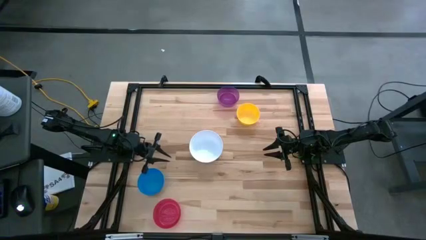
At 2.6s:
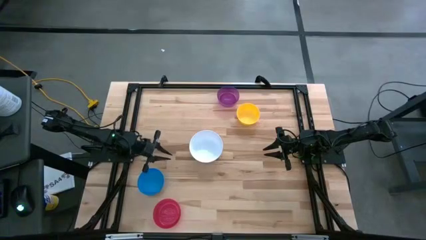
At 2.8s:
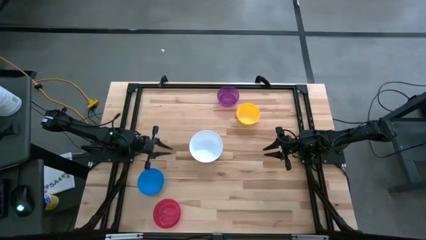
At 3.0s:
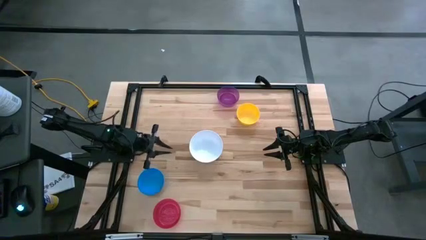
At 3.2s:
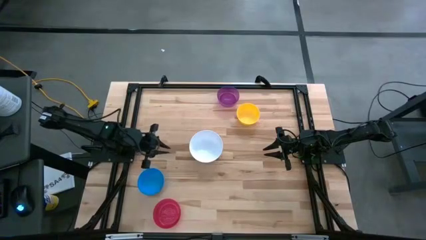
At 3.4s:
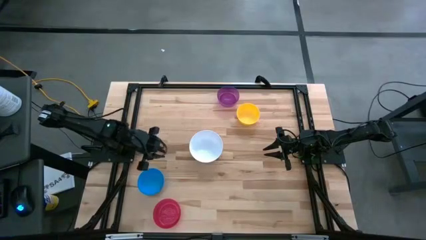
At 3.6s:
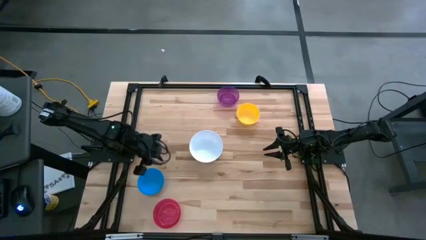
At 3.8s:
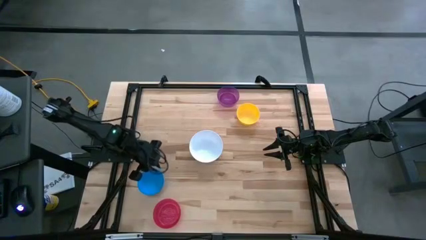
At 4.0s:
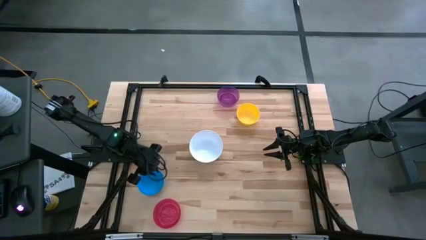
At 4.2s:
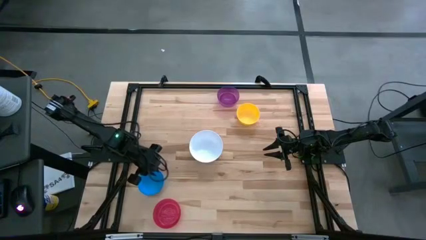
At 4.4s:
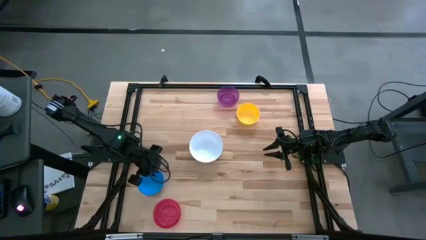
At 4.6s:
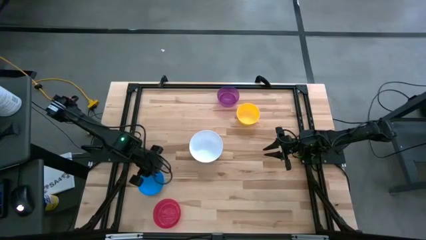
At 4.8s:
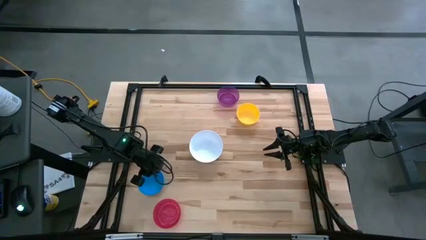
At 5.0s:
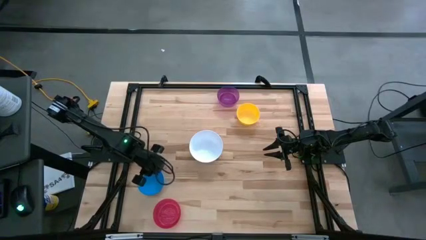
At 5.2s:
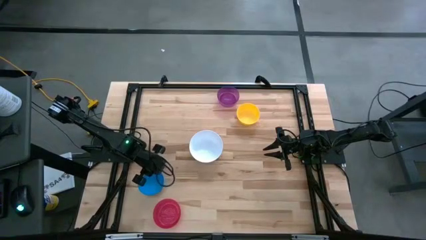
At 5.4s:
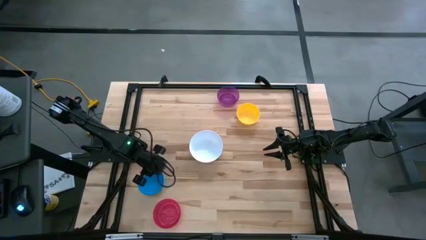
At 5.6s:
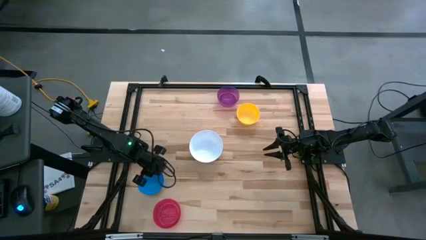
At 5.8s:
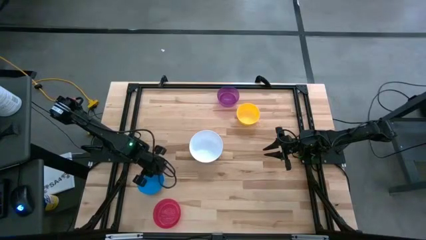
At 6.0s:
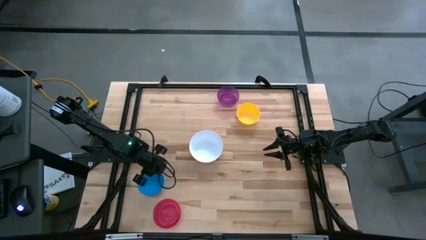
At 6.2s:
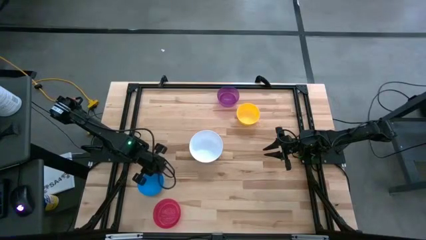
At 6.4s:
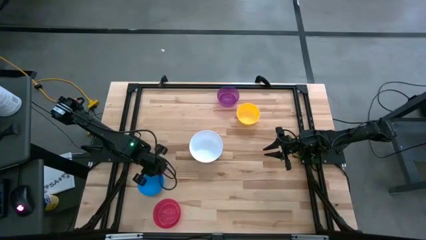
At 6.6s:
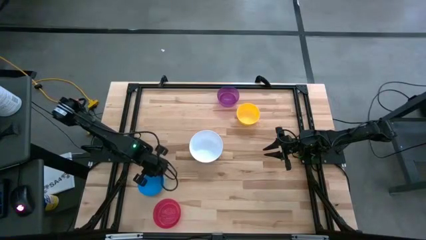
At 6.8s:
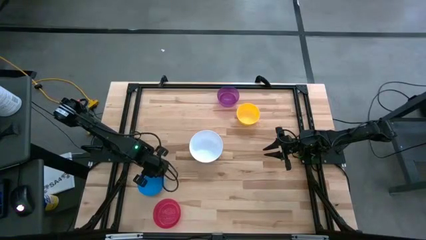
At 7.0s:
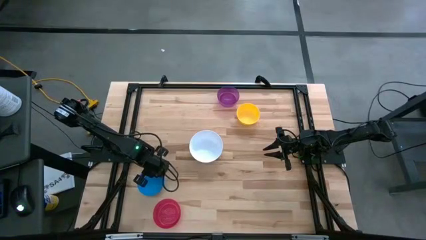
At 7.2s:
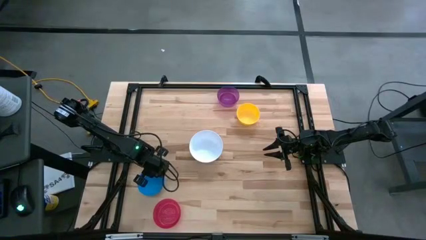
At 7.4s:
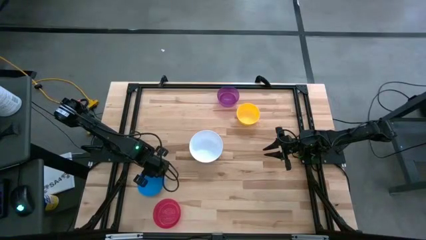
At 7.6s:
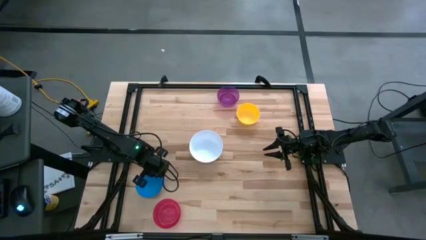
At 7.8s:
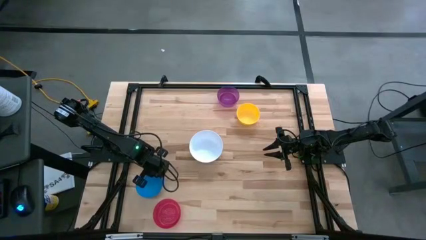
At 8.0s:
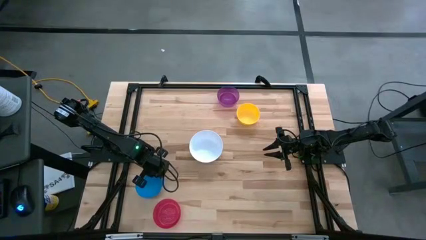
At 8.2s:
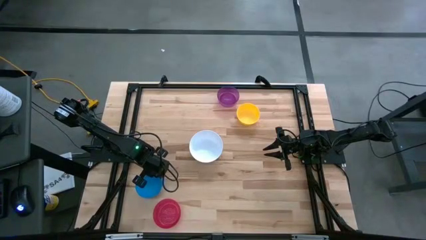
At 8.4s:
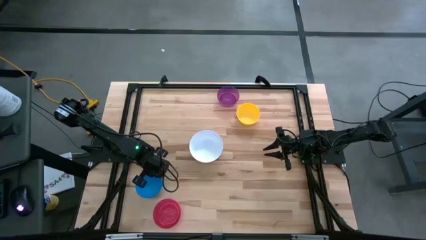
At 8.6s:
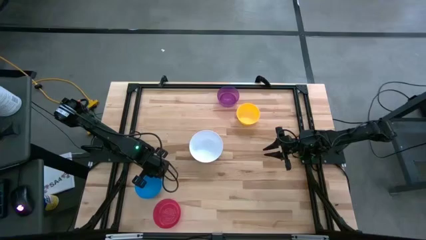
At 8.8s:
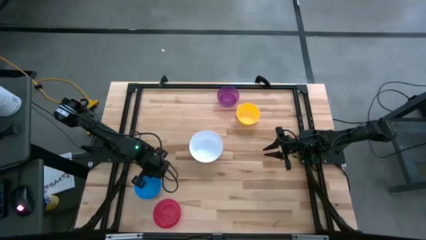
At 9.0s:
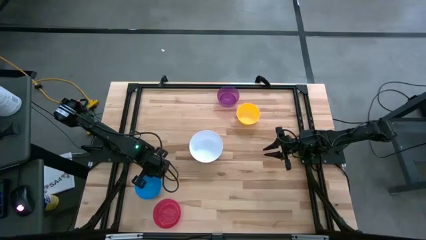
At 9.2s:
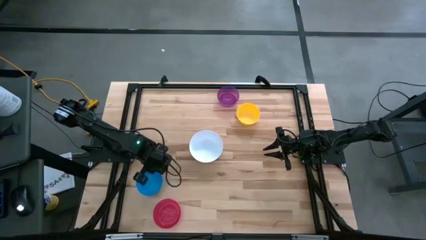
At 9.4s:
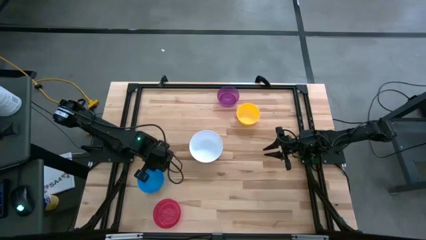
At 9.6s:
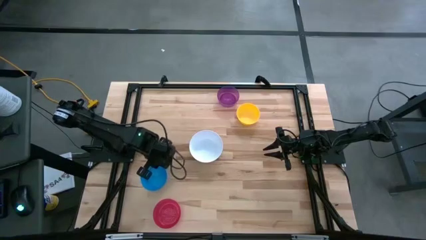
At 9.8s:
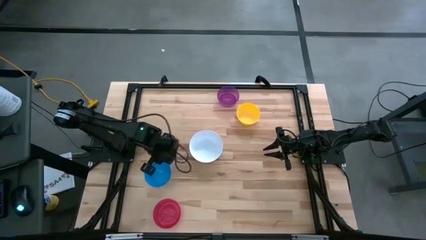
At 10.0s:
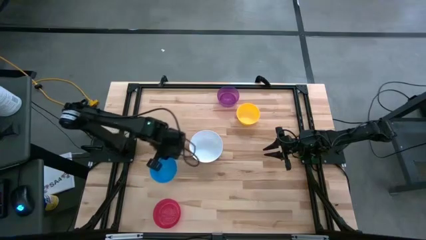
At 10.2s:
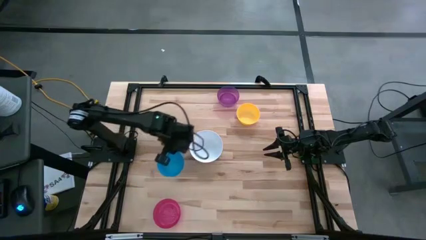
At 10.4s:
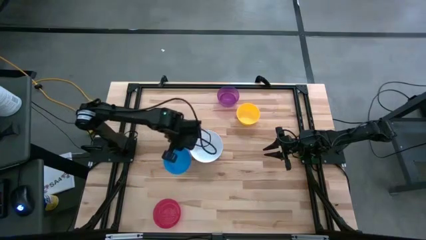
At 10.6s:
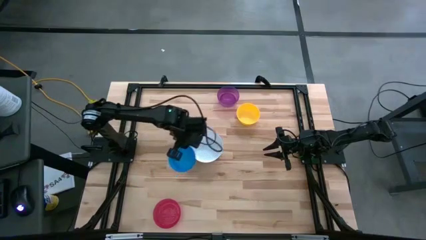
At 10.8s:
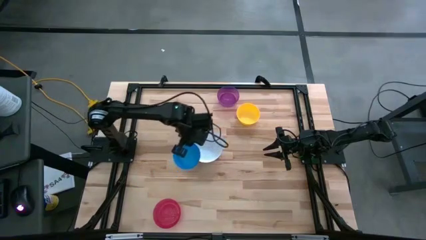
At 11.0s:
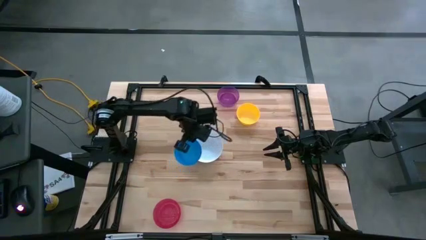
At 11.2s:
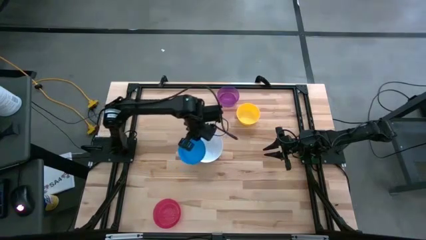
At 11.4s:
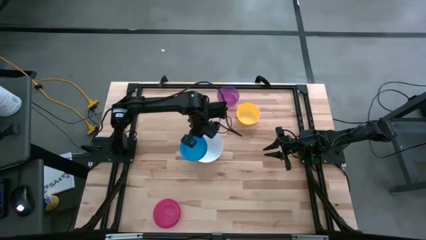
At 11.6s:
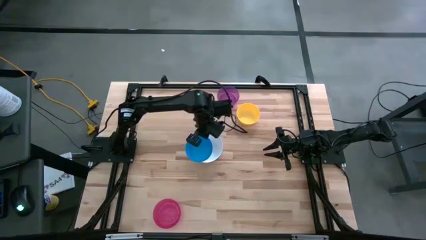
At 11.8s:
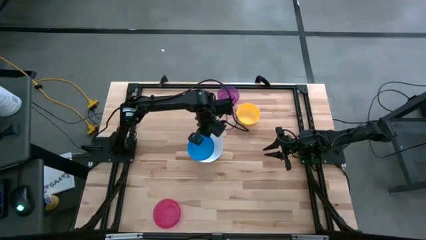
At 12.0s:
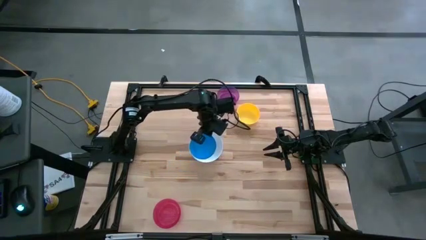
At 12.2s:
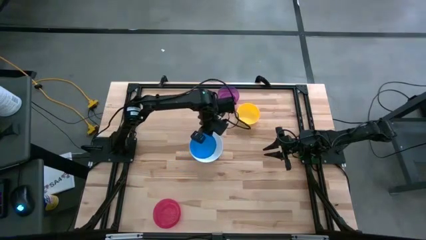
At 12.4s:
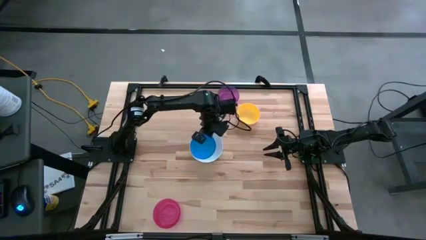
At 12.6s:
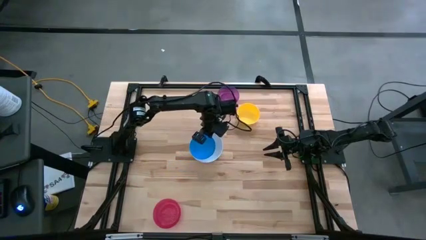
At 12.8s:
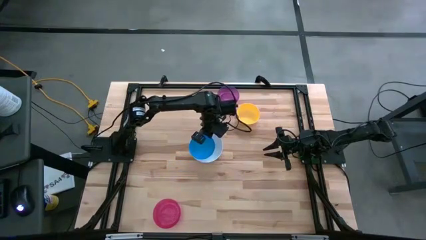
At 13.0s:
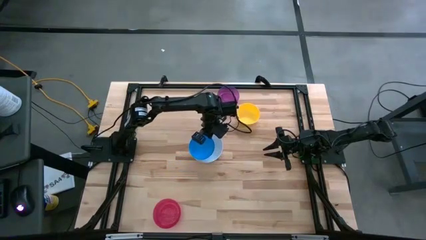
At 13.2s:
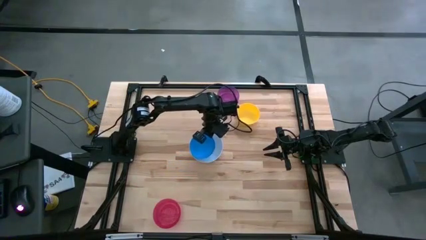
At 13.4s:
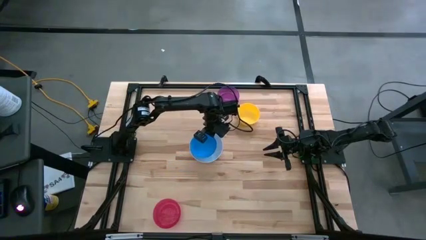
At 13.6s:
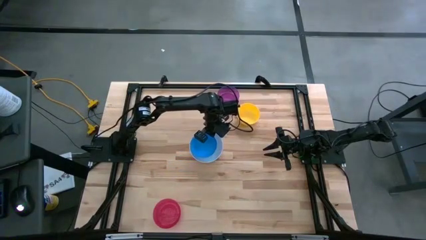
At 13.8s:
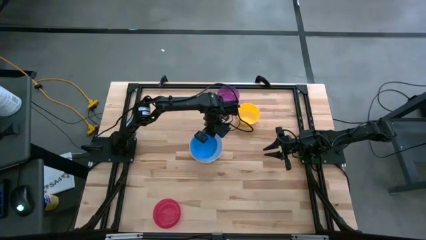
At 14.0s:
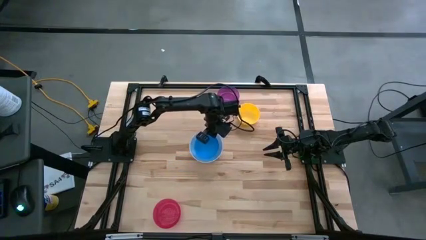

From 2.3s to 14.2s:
Stack the blue bowl on the white bowl

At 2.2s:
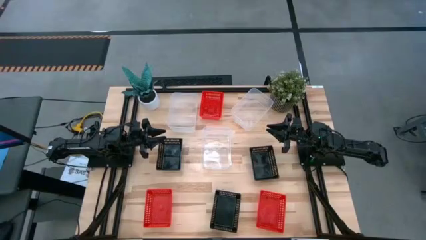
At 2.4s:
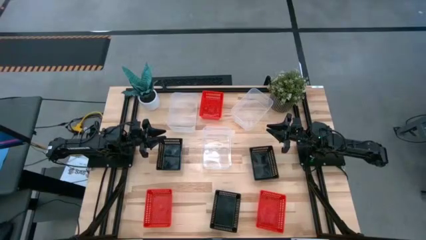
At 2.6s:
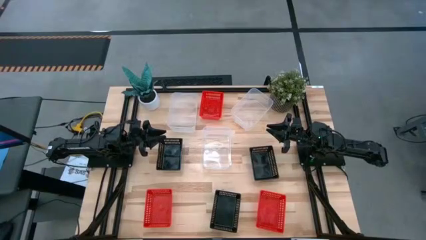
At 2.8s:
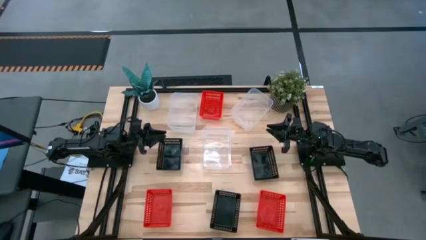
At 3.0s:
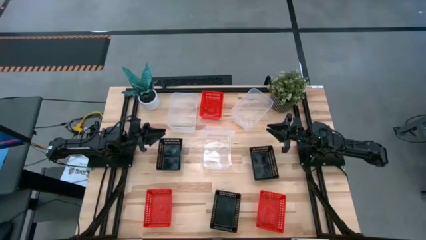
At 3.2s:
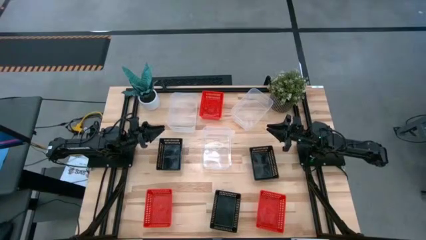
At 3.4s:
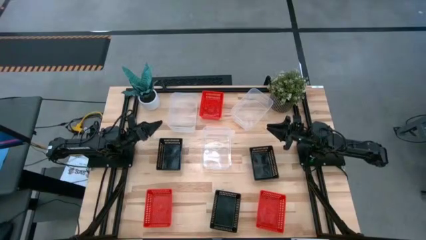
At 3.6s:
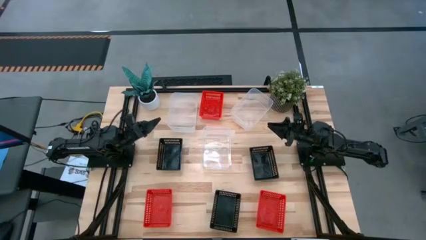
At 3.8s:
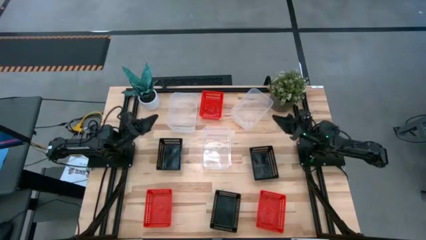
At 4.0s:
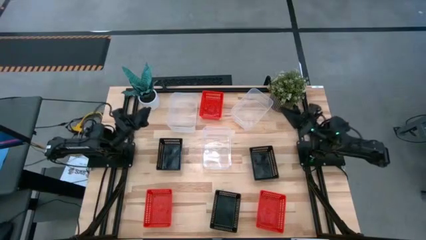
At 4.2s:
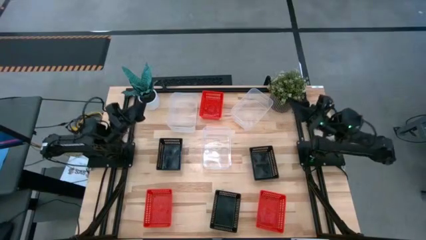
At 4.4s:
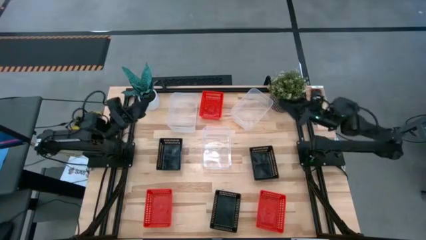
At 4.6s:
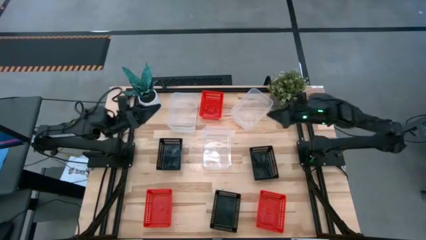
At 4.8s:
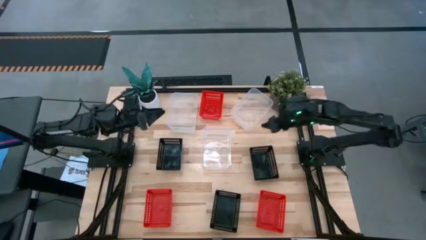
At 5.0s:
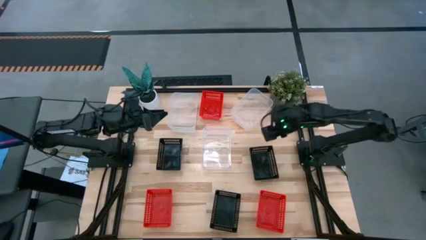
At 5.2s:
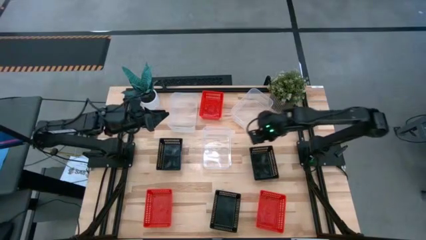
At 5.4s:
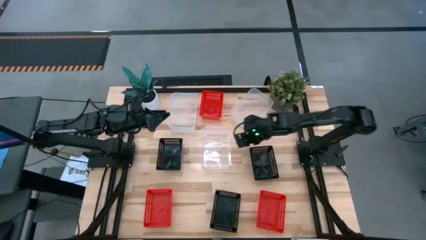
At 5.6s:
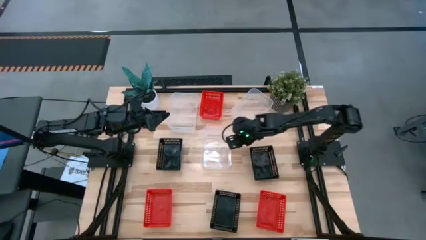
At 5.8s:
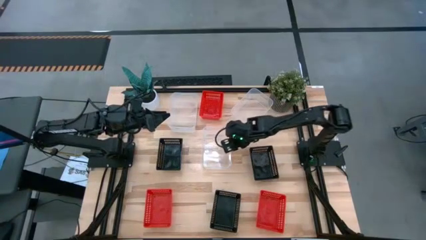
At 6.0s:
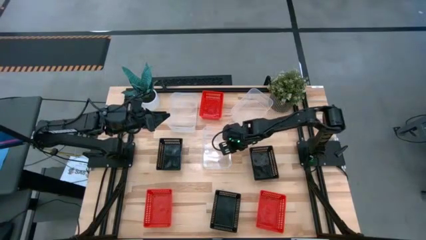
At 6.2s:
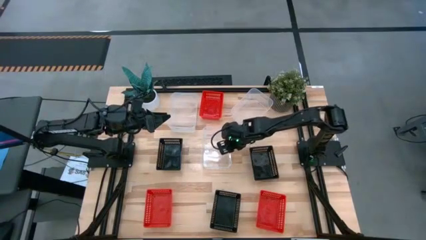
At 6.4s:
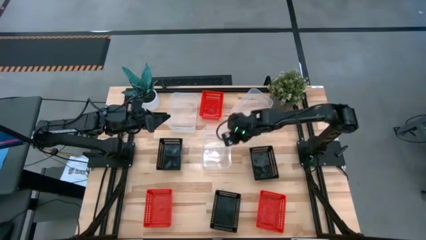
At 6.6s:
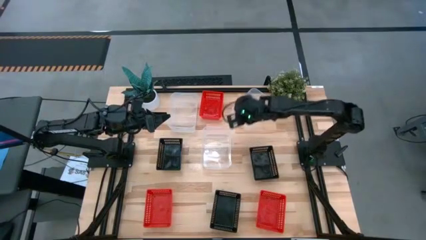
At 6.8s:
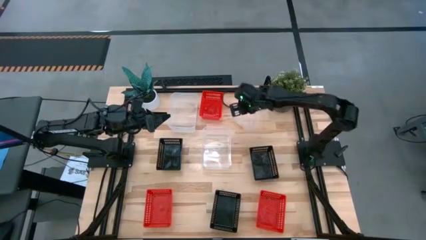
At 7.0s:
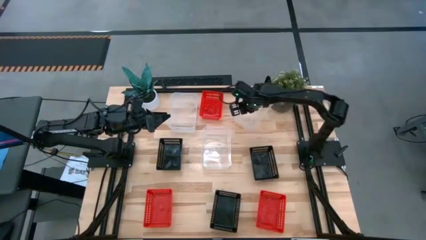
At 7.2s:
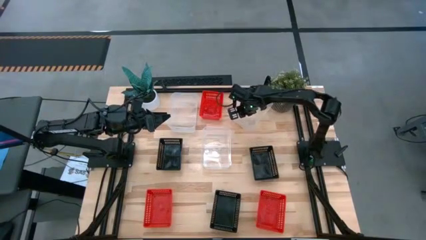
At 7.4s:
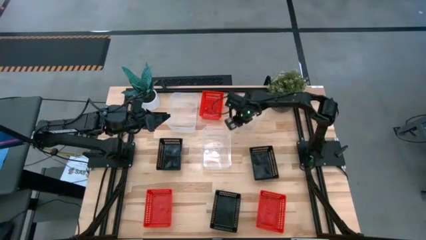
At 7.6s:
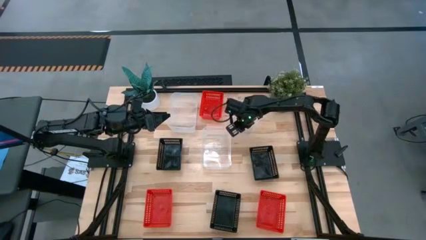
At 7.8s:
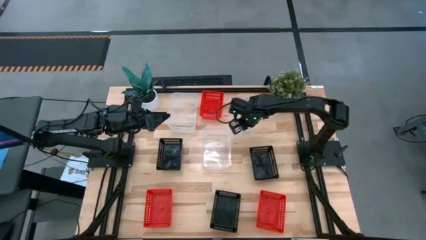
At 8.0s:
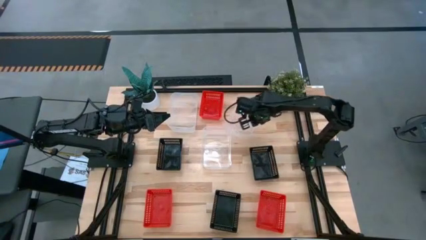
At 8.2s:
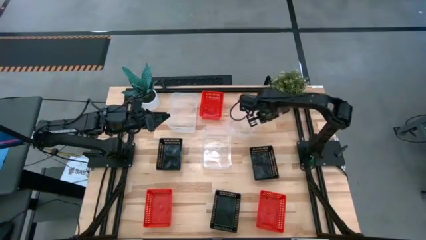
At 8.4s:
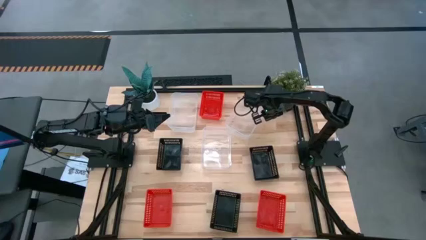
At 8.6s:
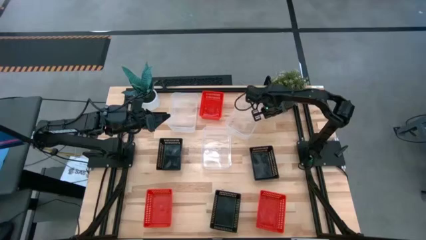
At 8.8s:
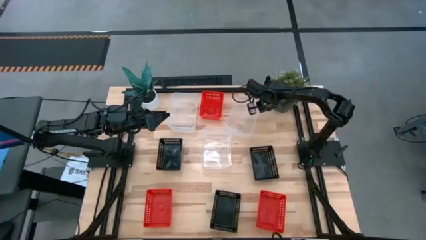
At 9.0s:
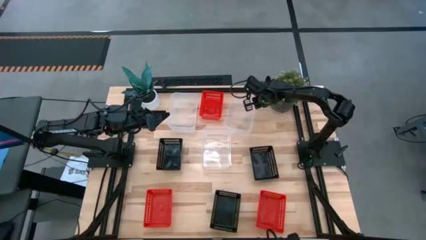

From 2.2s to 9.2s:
Adjust the top right transparent bin
